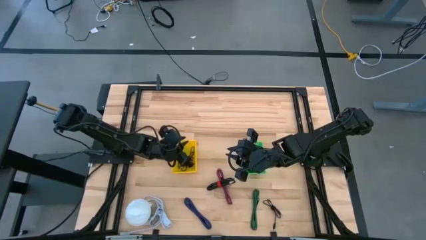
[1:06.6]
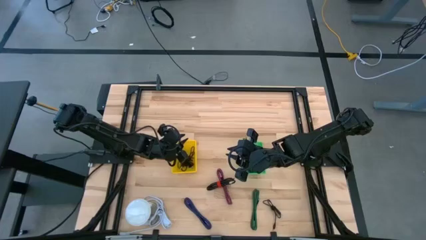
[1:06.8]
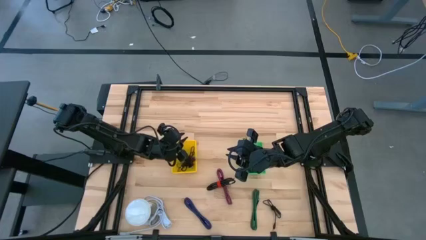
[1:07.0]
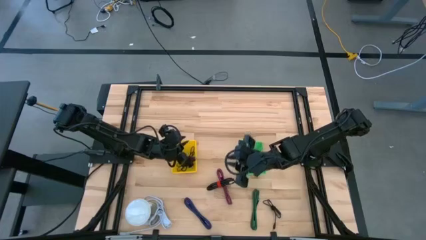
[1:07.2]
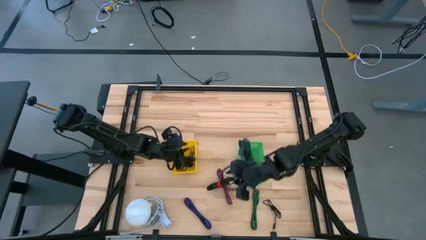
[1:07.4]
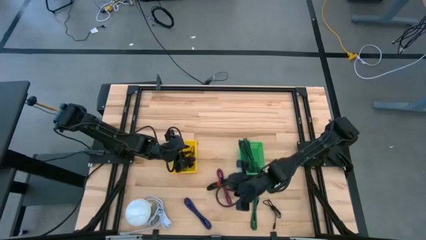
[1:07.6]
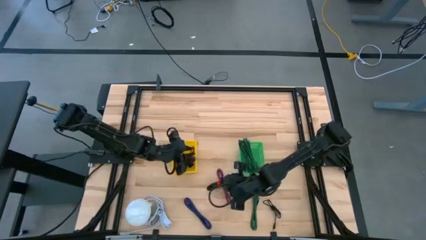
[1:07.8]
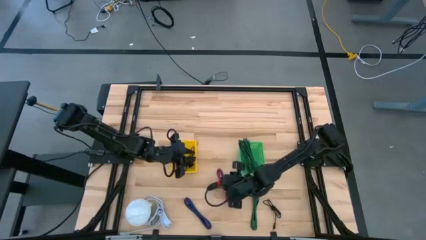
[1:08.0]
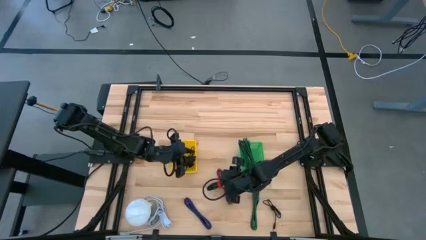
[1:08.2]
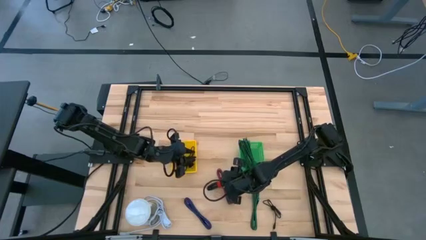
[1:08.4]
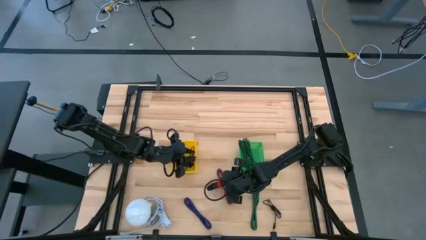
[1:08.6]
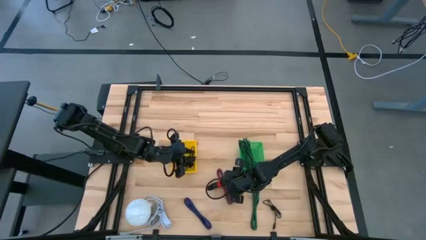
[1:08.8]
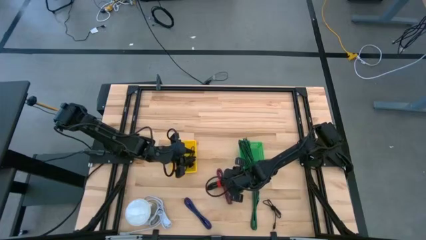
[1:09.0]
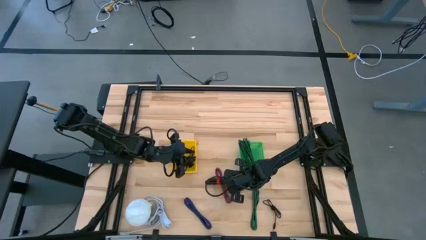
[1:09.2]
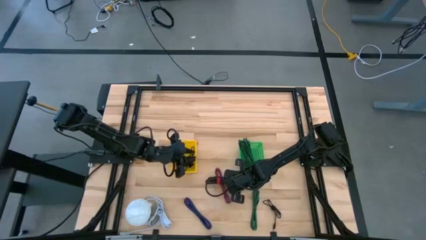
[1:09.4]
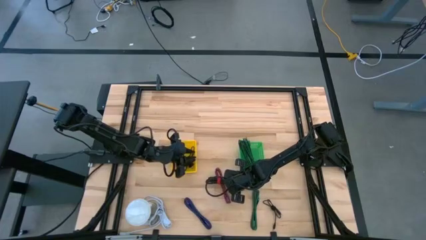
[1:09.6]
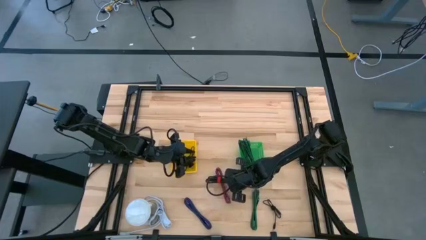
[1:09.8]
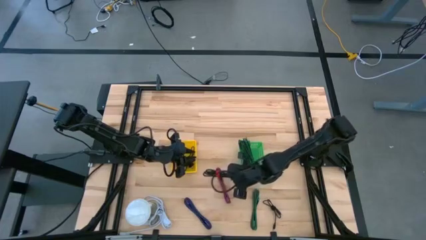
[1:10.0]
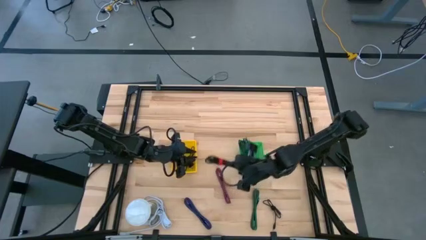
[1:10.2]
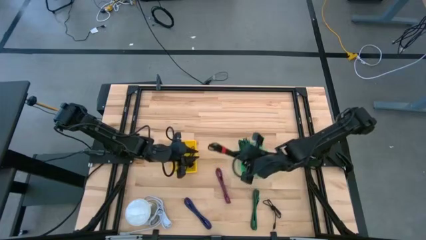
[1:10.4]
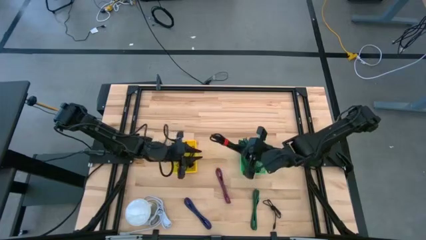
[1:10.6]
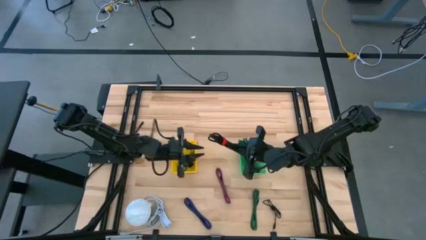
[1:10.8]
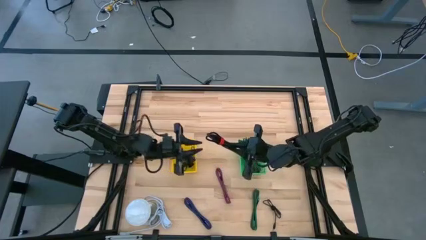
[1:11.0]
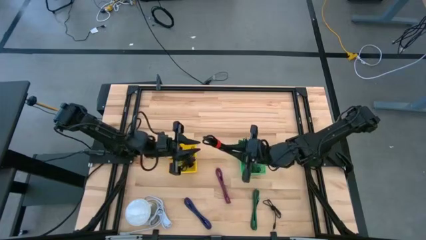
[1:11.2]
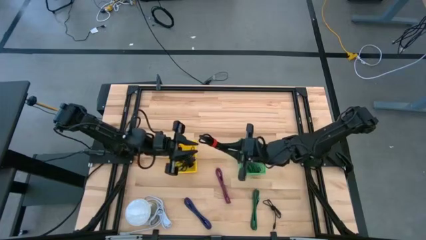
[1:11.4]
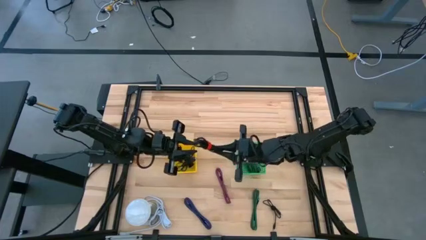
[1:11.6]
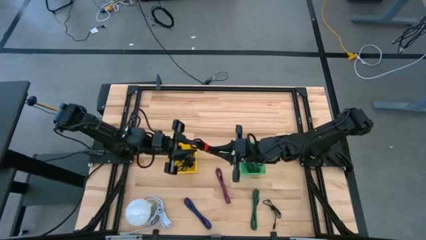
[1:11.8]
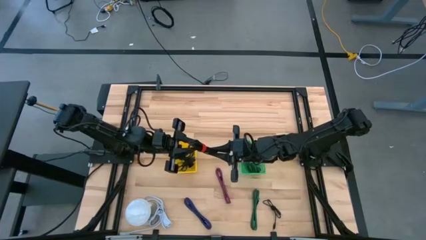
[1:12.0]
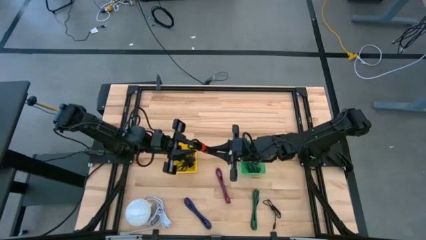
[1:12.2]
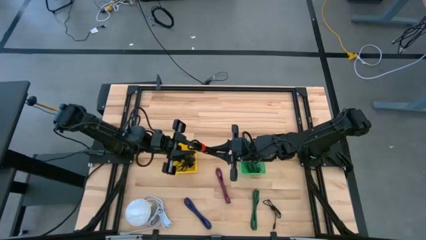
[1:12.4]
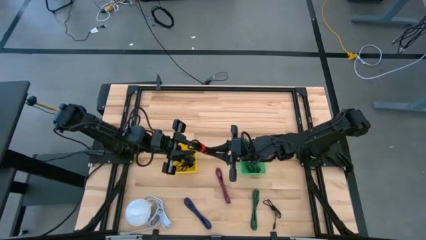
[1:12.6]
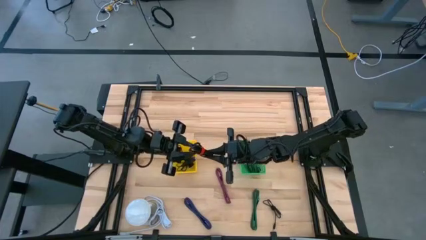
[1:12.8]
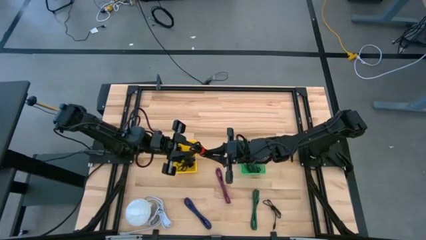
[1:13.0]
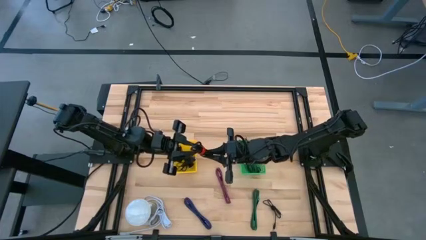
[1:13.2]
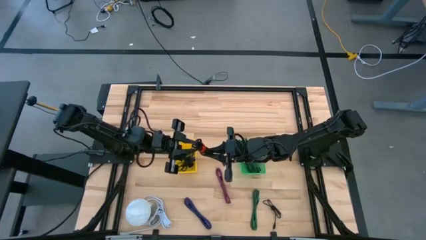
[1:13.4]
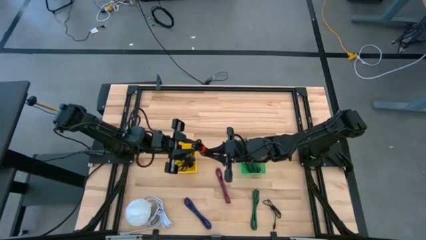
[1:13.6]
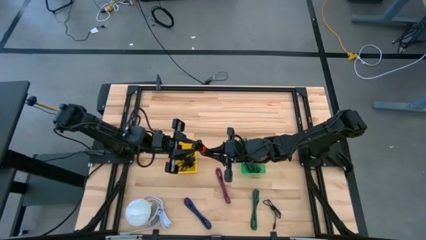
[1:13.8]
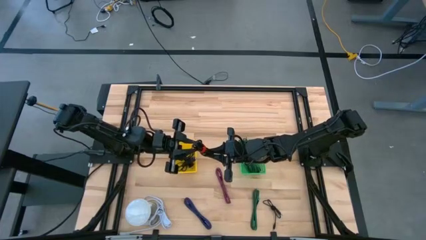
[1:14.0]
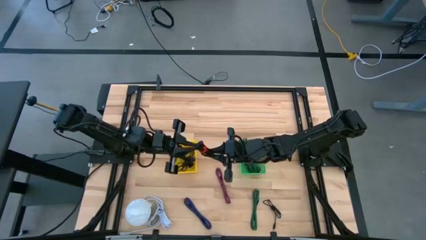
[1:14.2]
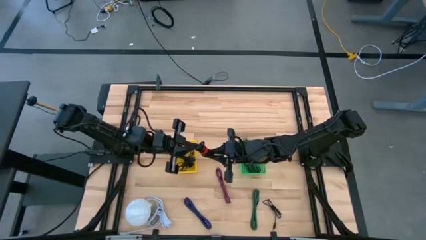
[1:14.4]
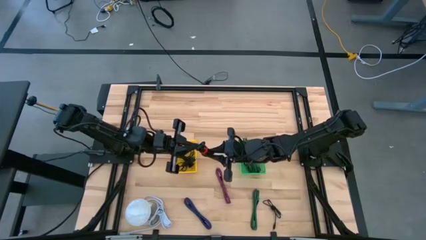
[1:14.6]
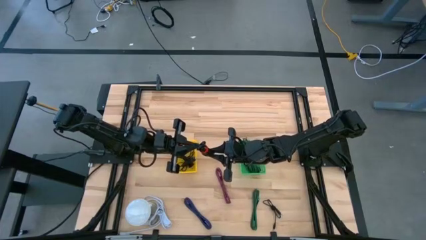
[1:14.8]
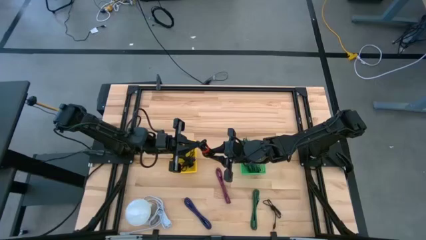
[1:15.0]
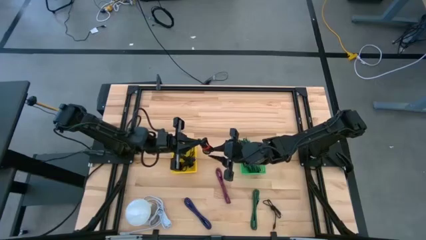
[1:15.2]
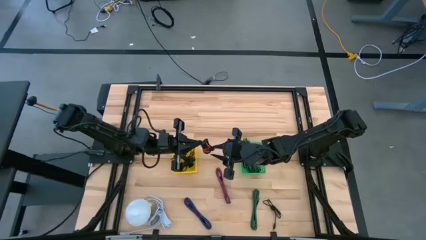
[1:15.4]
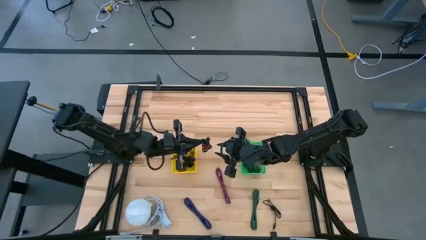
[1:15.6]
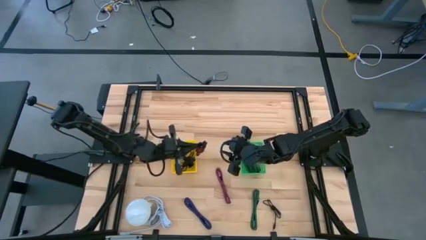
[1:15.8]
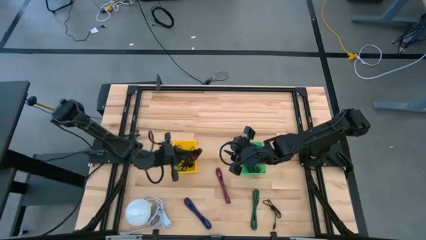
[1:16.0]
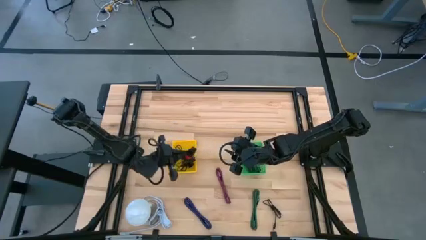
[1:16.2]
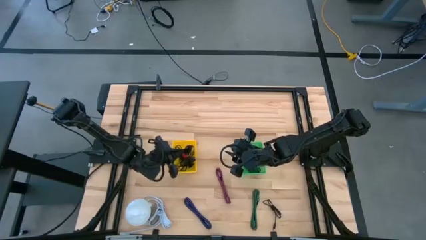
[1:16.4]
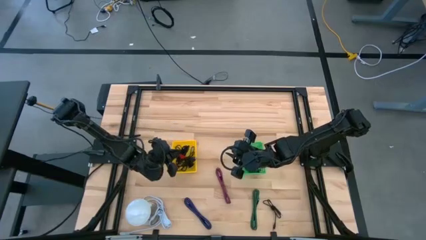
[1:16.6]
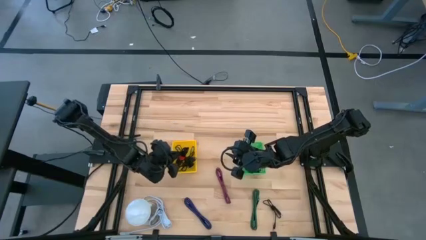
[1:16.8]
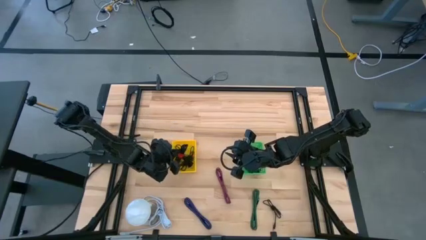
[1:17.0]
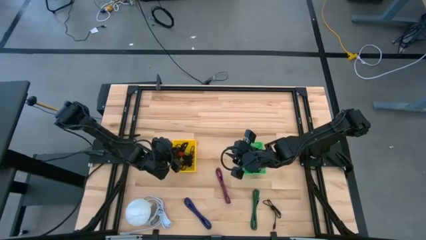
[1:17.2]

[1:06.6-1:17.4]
Task: Pick & Place USB Port
Put the black charger cable into the yellow bin
